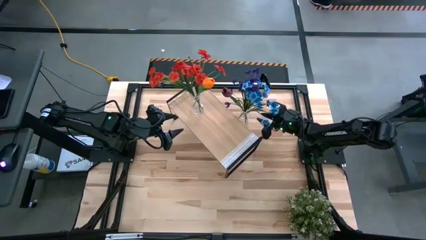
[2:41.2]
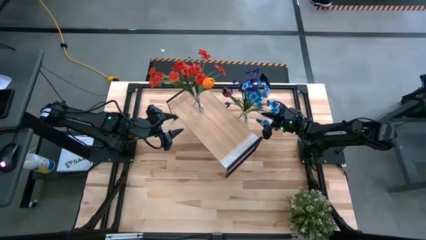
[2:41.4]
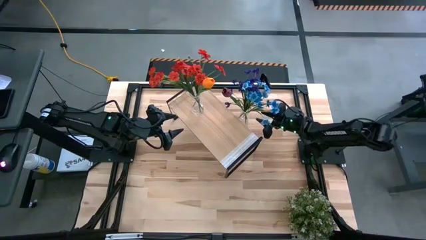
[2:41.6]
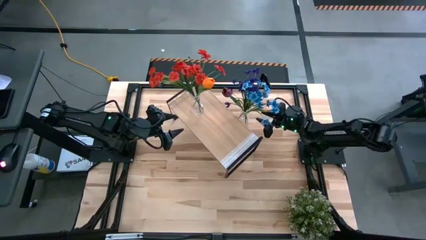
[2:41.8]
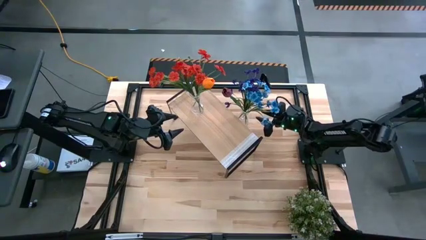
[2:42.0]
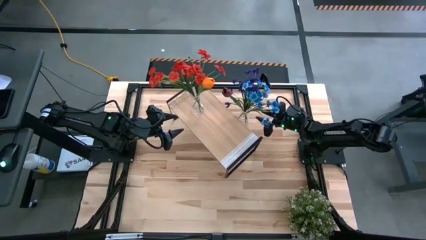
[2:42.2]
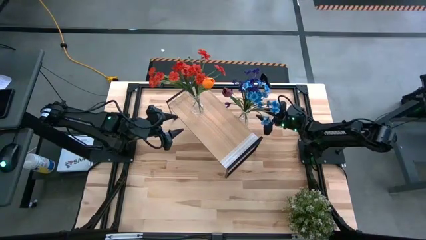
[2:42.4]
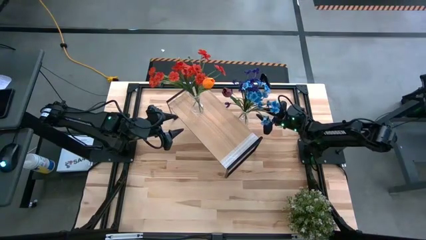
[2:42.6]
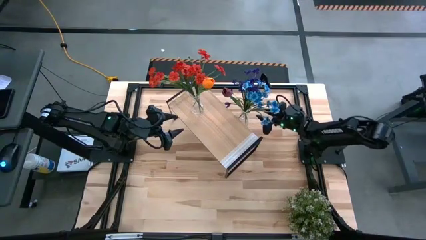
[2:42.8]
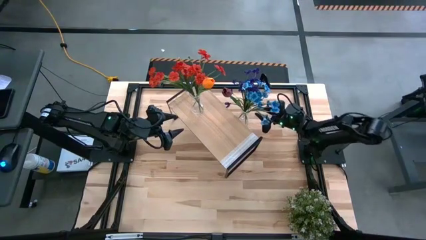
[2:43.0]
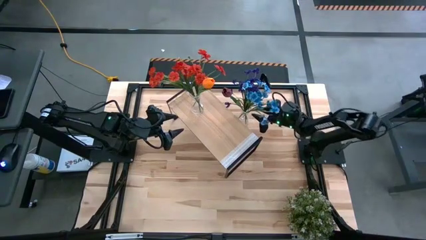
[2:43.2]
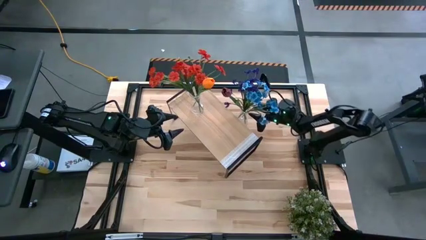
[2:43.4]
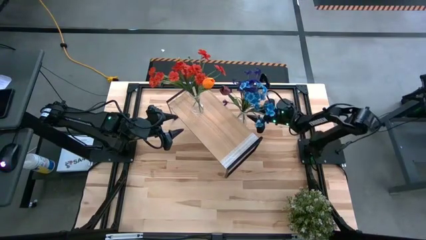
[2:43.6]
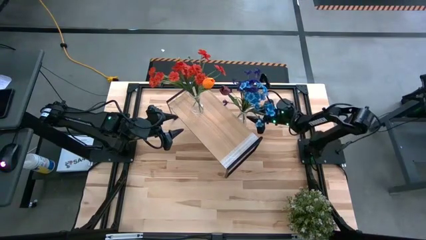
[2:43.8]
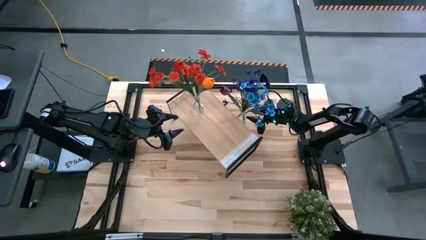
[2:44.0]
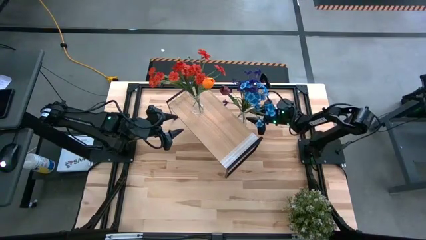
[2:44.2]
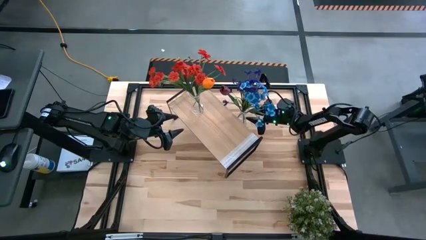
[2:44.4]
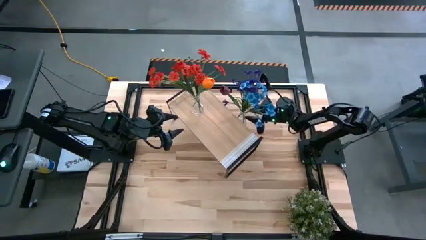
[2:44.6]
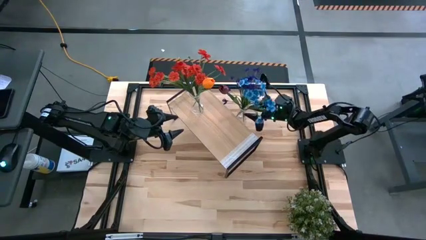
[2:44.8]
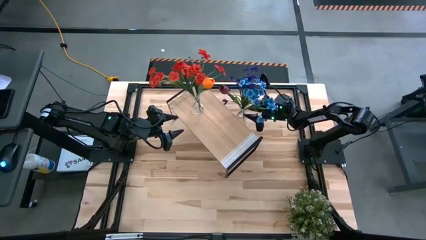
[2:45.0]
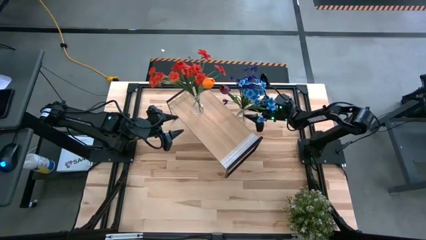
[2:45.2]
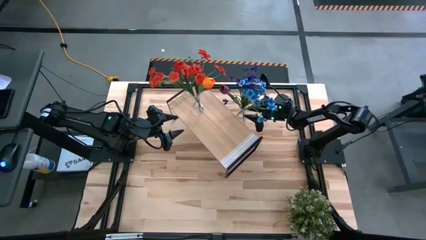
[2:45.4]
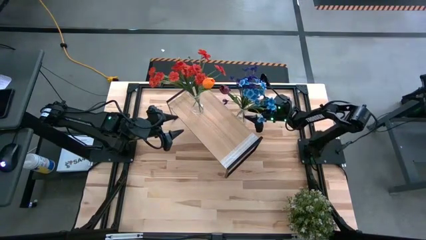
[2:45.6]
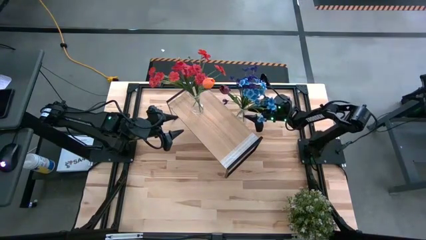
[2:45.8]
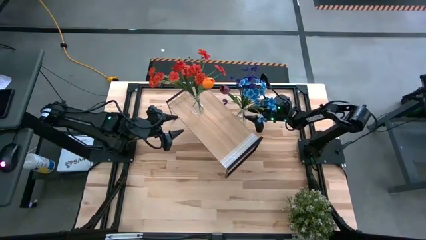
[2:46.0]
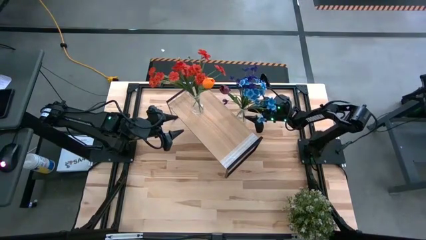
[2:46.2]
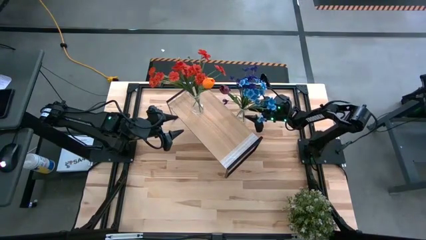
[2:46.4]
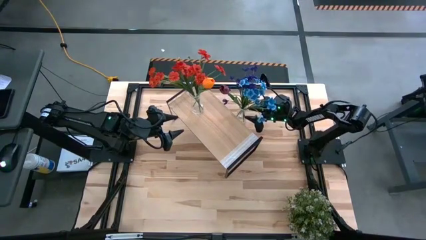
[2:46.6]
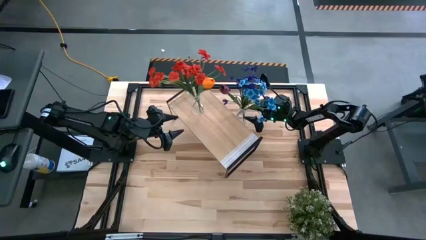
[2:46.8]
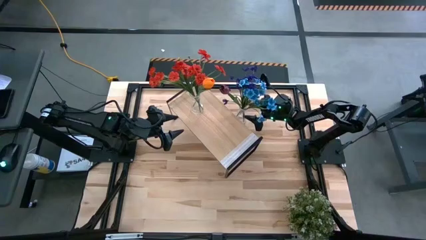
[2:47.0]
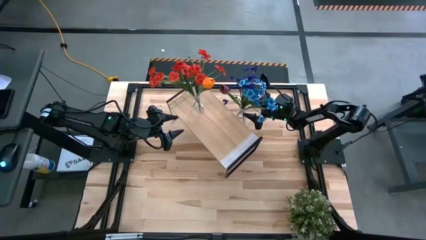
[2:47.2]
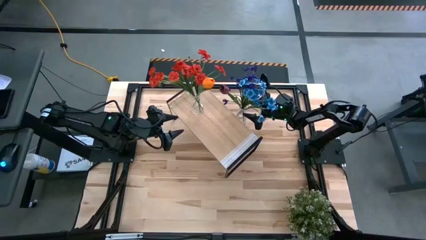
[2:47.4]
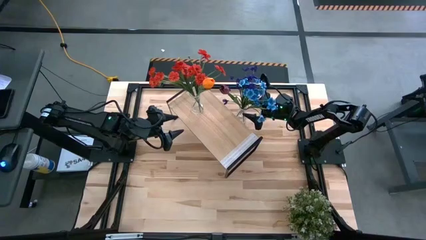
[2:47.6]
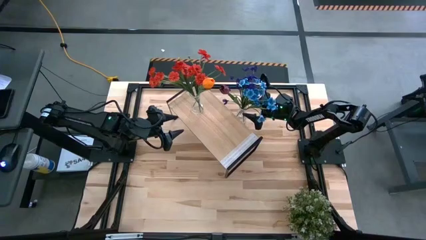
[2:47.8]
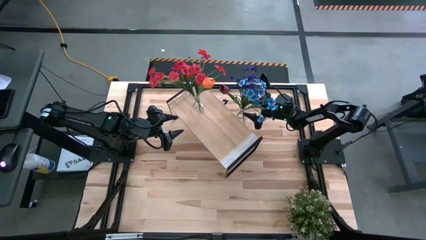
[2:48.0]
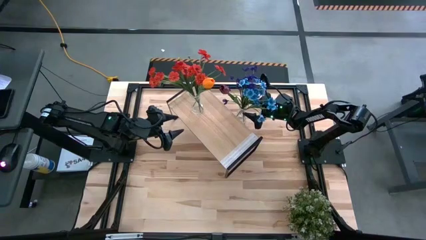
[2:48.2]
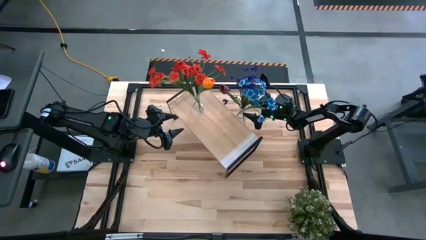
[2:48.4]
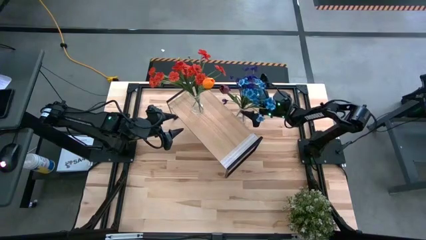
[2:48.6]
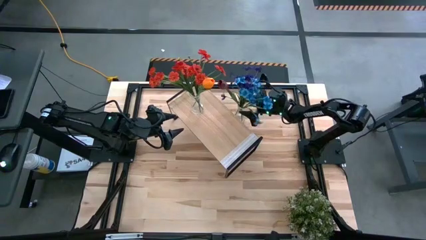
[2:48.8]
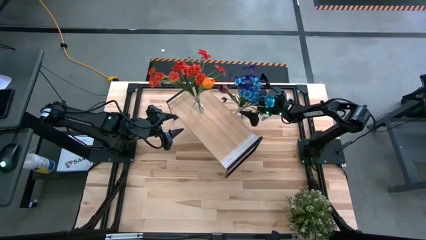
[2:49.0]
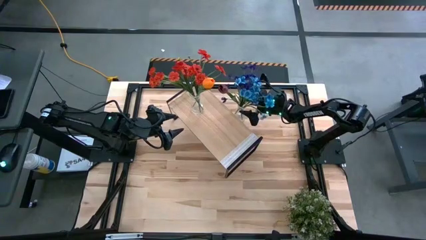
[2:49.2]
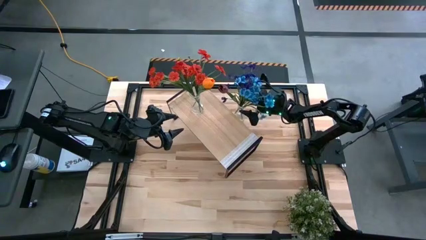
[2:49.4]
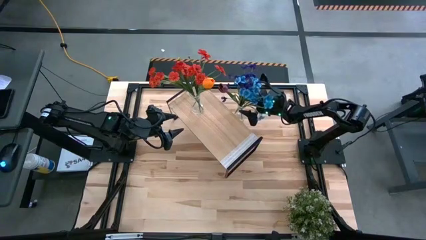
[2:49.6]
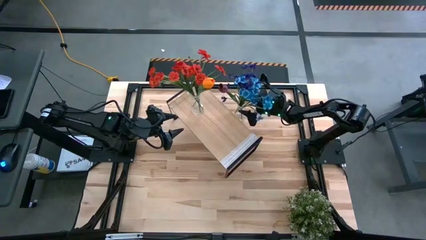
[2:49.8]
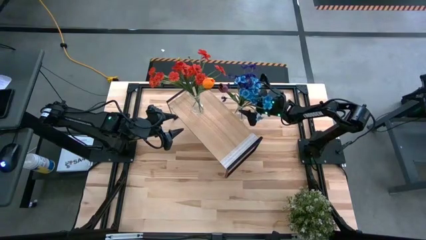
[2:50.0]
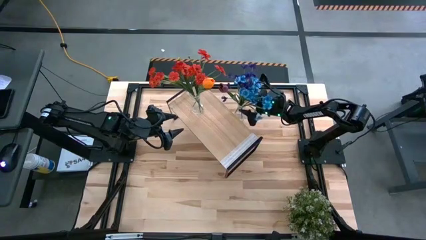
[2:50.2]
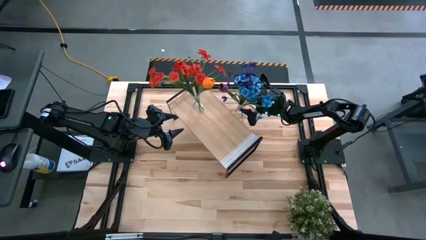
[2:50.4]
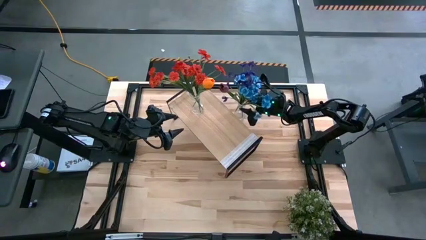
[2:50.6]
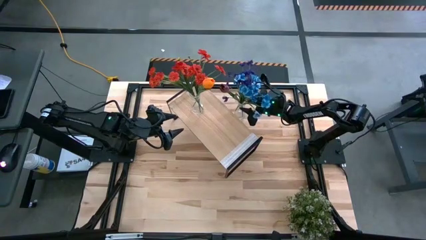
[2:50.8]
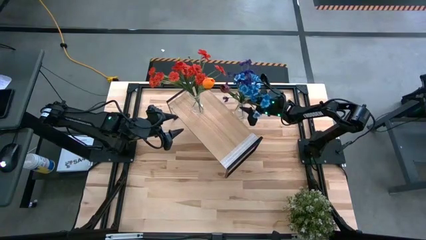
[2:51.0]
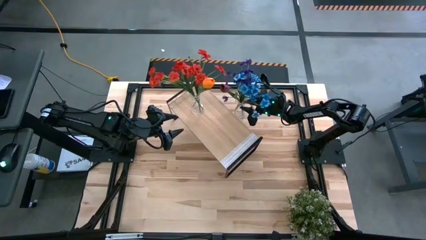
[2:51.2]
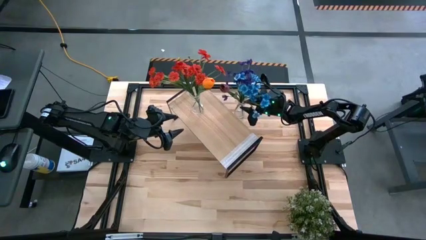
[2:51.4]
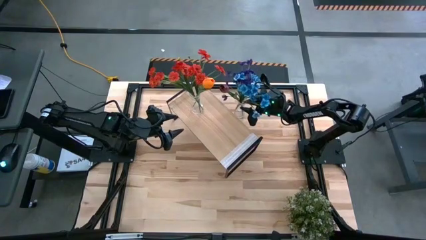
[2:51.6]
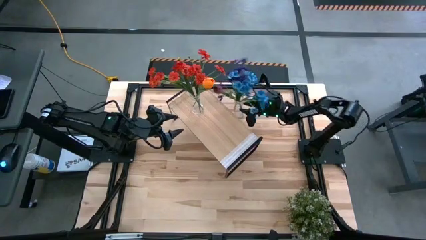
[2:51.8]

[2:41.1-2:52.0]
Task: Pick and place flowers into a vace then onto a shelf
Put the transparent vase with flowers on the shelf

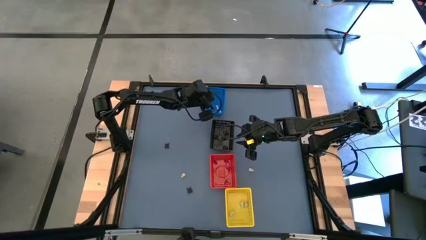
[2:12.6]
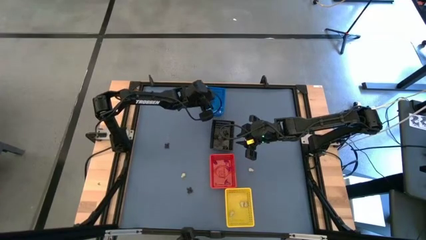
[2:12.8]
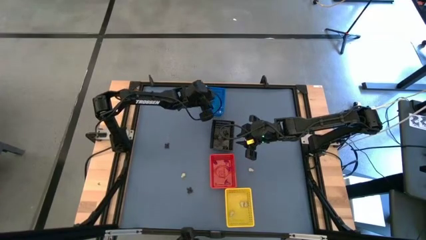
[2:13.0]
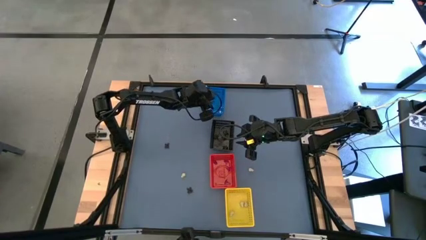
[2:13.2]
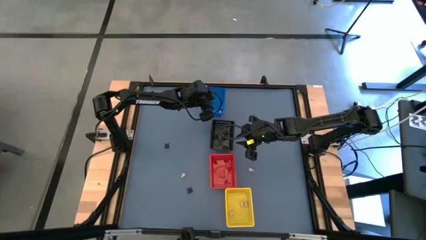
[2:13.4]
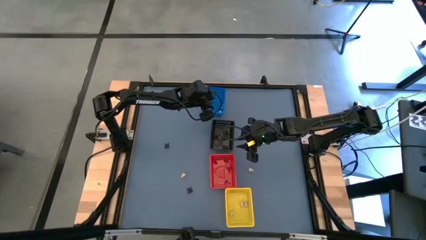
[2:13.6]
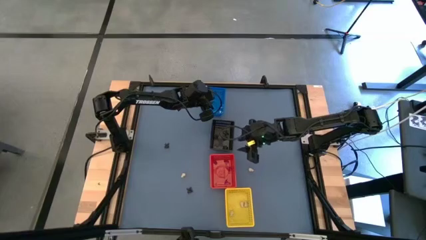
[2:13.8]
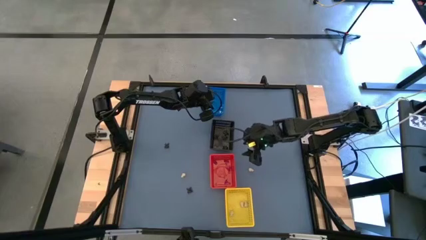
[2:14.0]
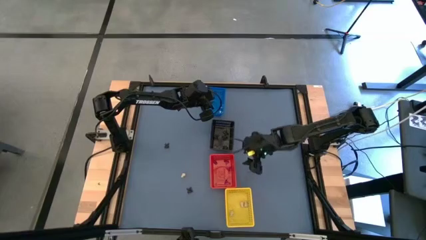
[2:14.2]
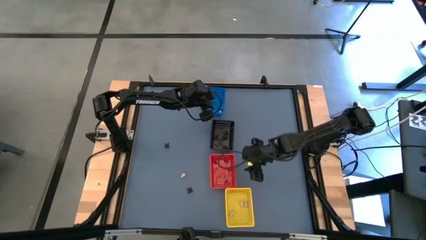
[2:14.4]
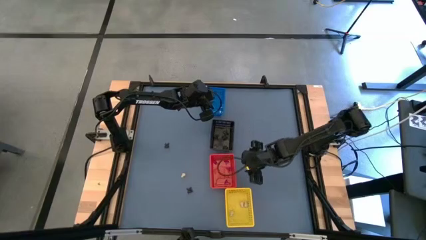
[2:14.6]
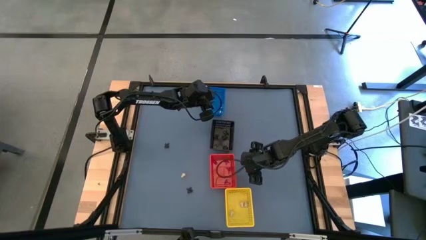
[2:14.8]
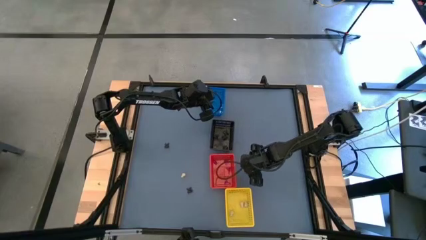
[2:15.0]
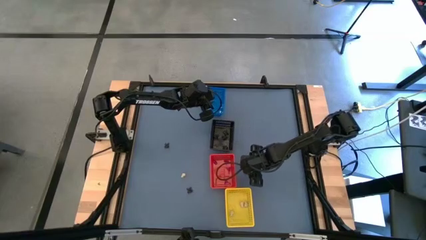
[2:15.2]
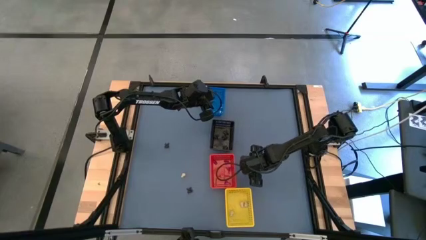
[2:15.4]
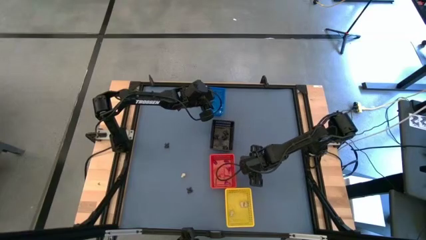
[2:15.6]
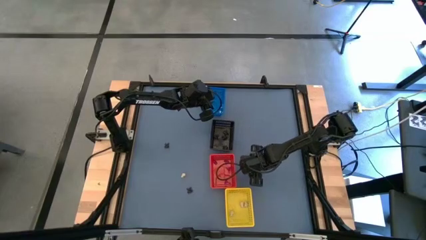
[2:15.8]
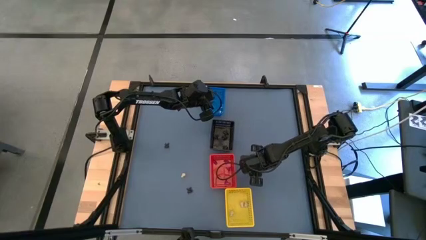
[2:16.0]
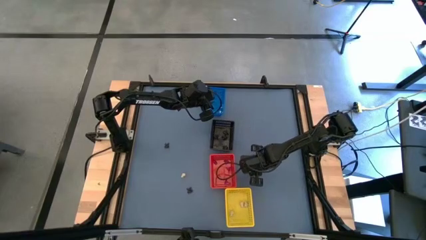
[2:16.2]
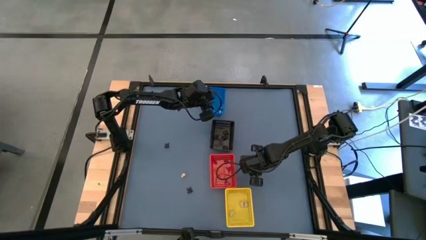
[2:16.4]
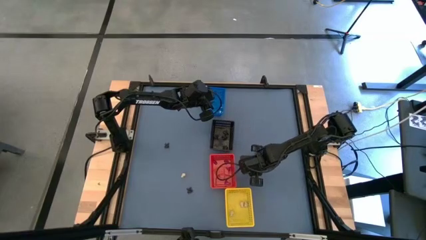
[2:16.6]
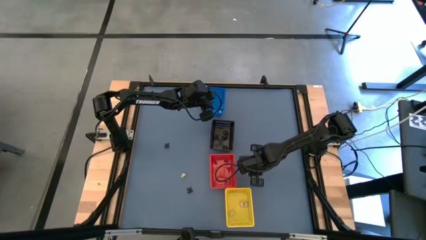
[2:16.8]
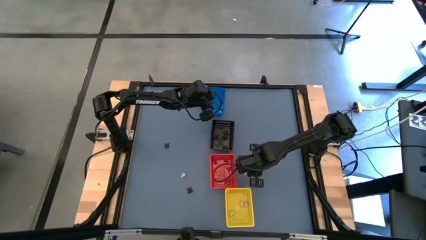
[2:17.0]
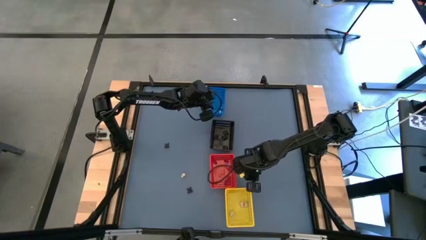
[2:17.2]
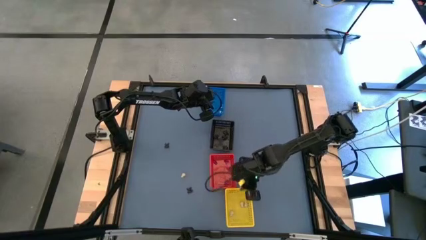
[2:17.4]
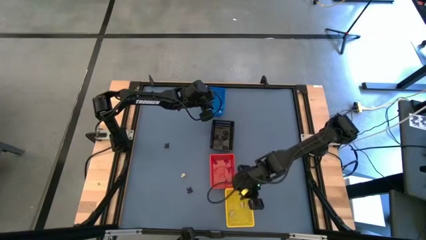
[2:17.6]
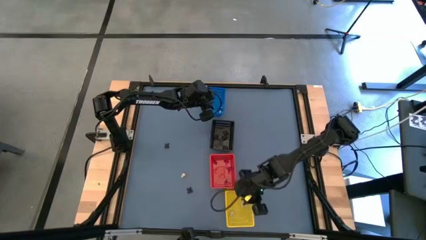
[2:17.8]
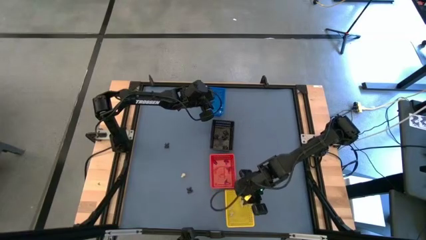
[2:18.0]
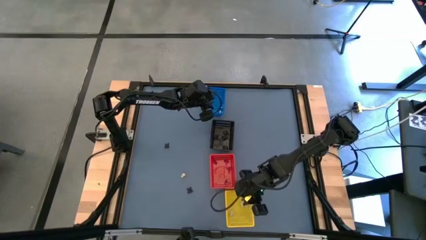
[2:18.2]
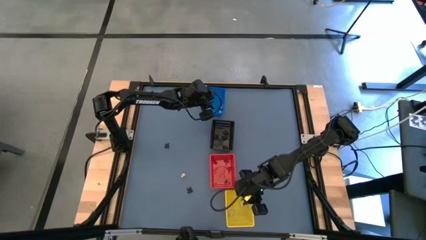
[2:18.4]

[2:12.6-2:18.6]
Task: Sort Halloween decoration
Put the brown skull toy into the yellow bin
